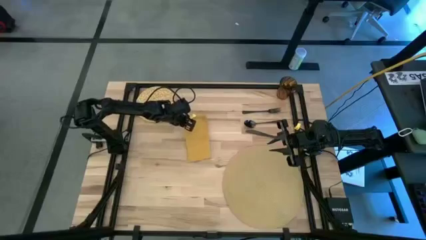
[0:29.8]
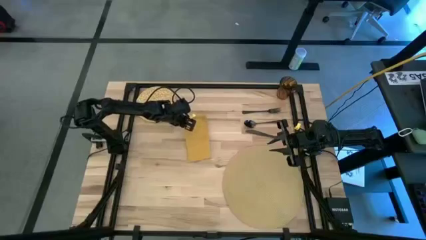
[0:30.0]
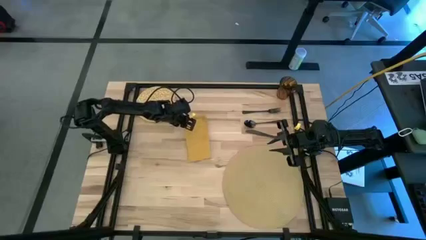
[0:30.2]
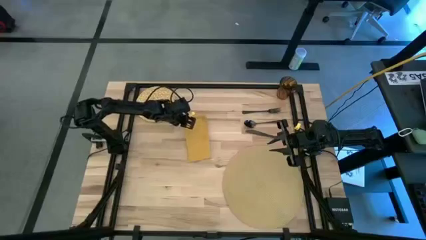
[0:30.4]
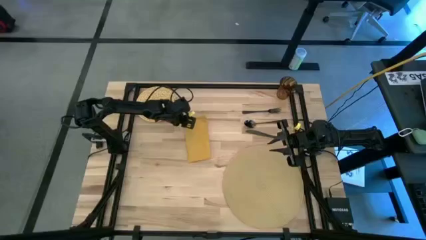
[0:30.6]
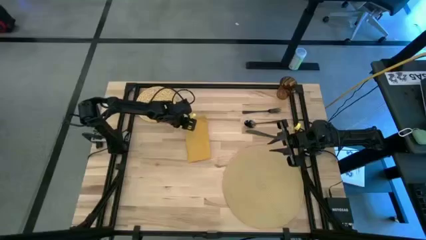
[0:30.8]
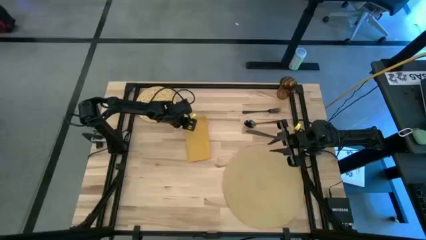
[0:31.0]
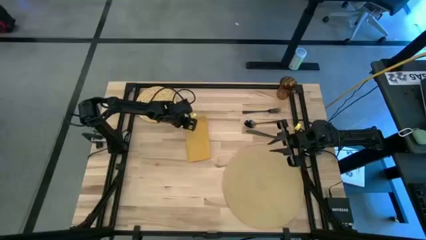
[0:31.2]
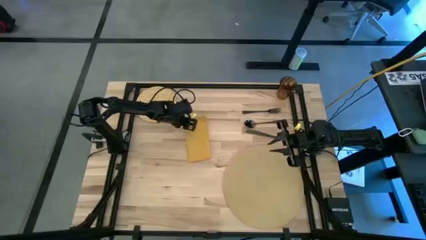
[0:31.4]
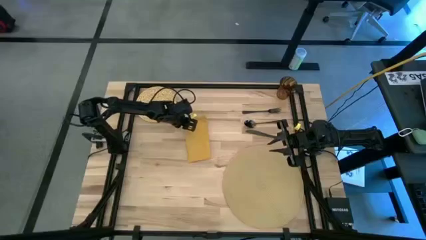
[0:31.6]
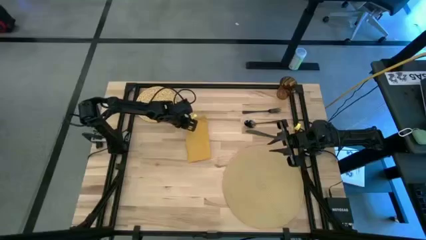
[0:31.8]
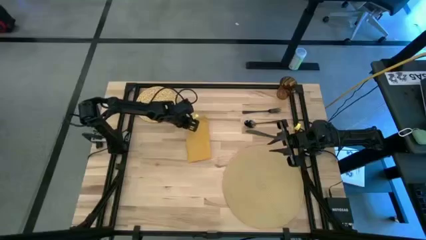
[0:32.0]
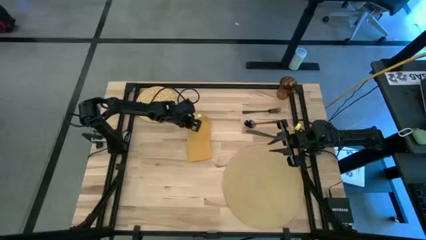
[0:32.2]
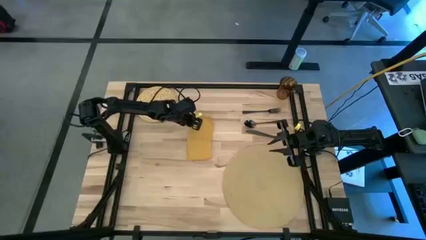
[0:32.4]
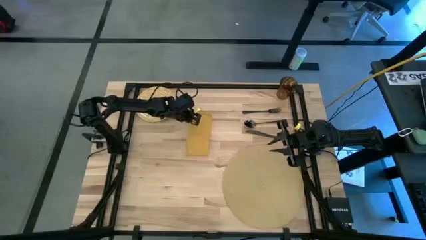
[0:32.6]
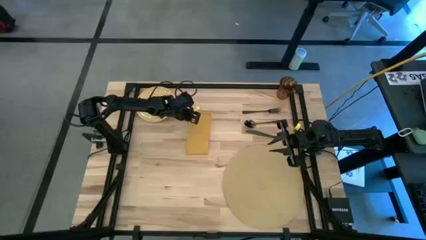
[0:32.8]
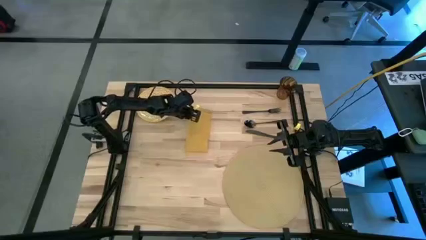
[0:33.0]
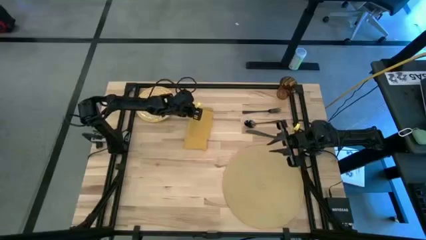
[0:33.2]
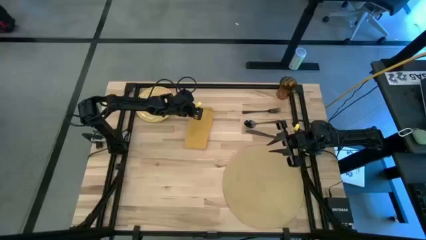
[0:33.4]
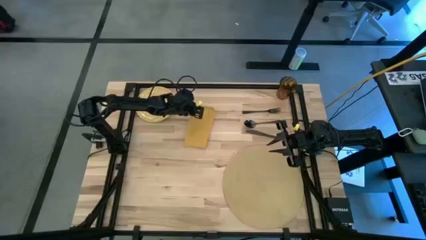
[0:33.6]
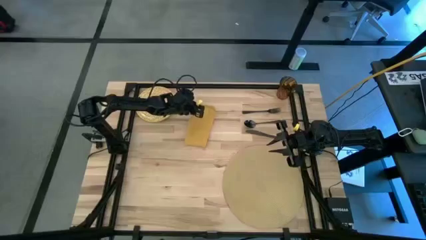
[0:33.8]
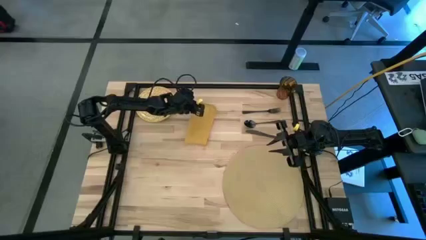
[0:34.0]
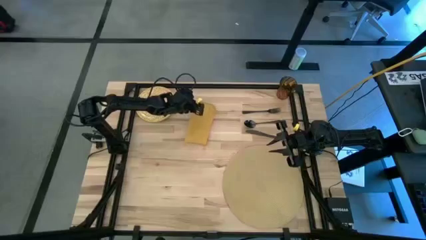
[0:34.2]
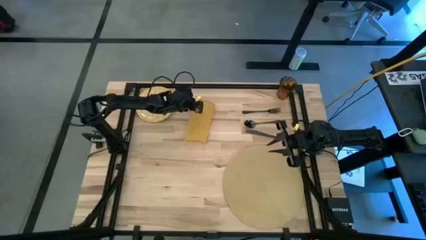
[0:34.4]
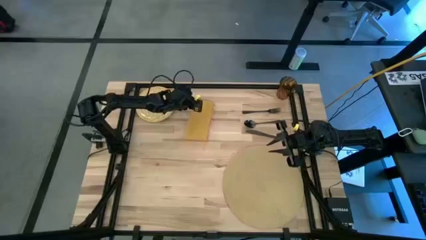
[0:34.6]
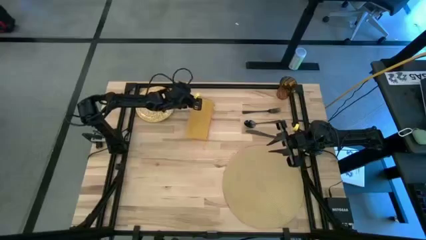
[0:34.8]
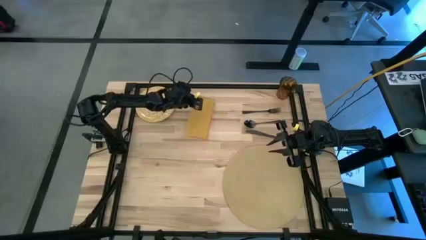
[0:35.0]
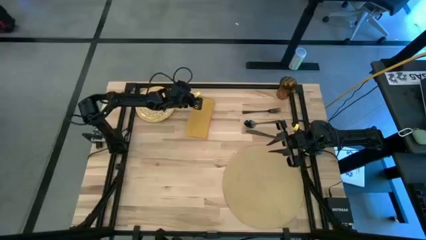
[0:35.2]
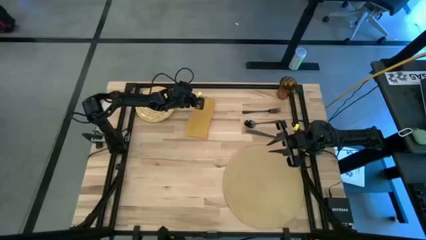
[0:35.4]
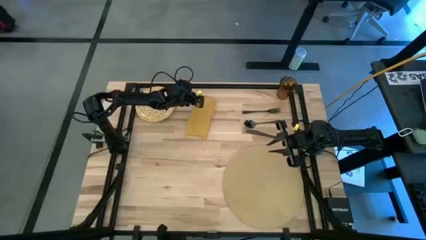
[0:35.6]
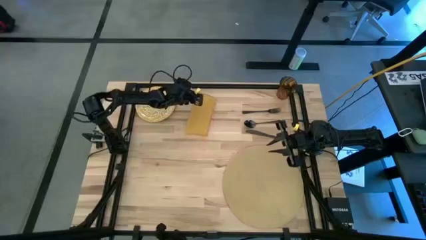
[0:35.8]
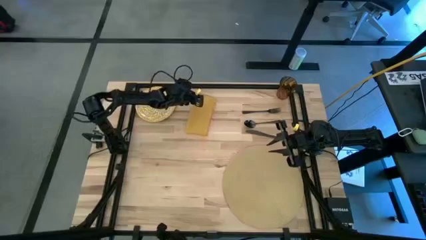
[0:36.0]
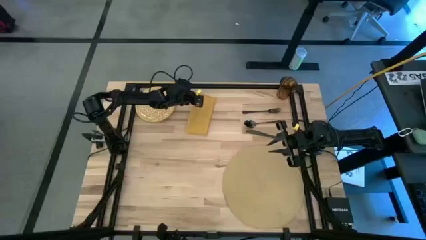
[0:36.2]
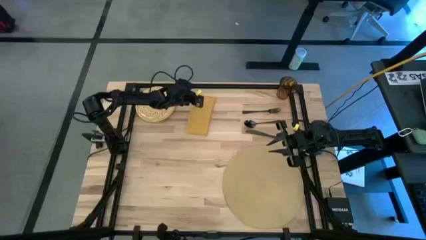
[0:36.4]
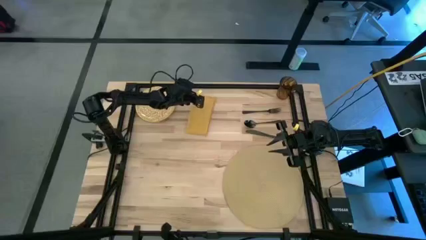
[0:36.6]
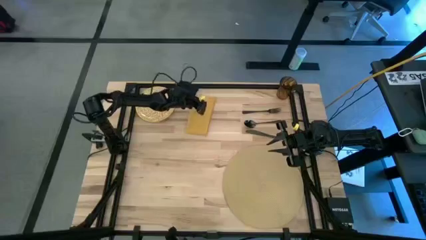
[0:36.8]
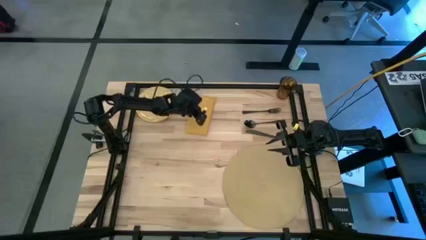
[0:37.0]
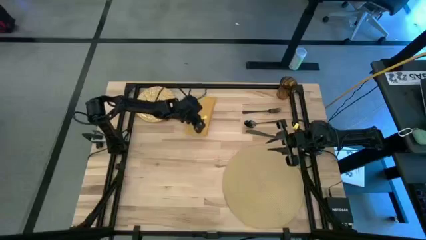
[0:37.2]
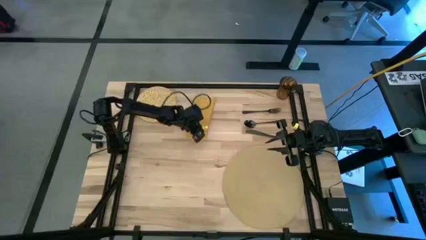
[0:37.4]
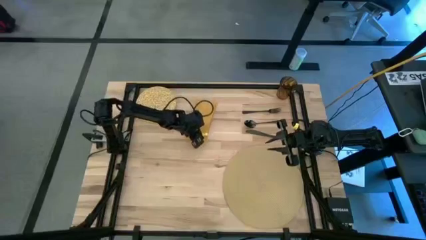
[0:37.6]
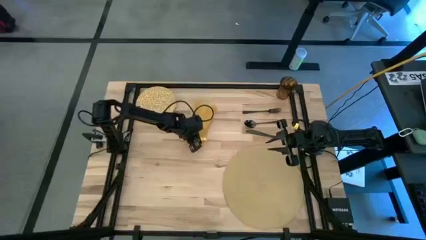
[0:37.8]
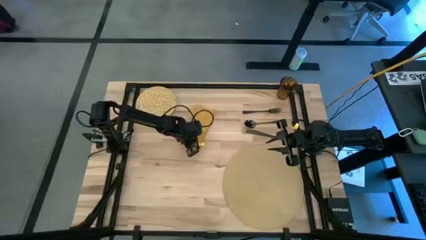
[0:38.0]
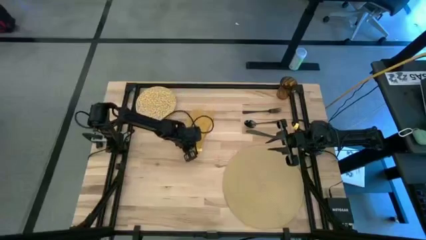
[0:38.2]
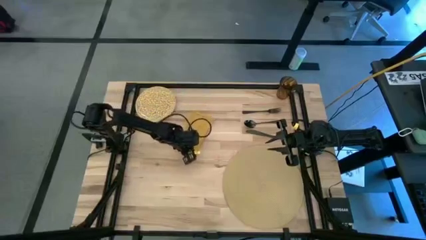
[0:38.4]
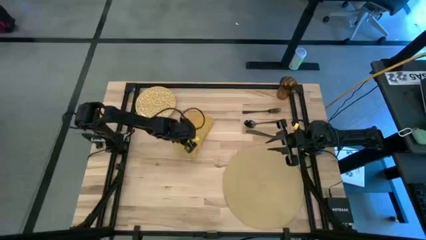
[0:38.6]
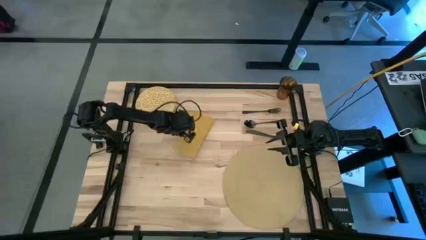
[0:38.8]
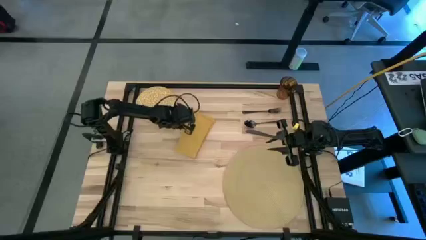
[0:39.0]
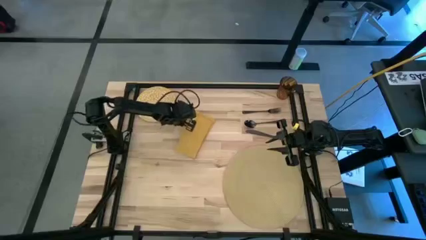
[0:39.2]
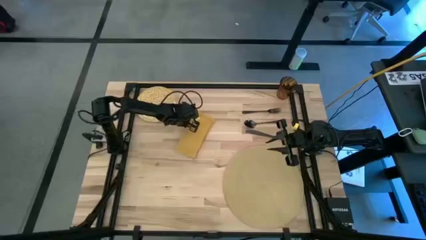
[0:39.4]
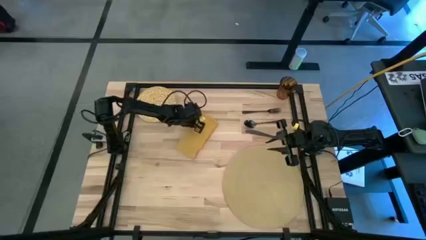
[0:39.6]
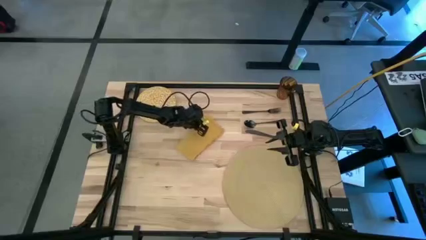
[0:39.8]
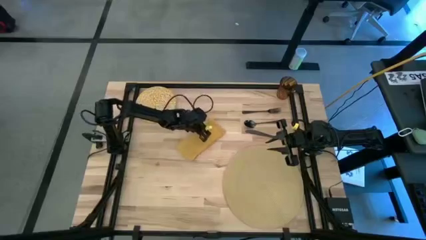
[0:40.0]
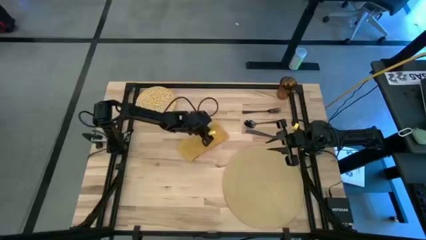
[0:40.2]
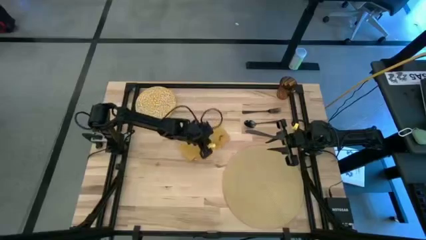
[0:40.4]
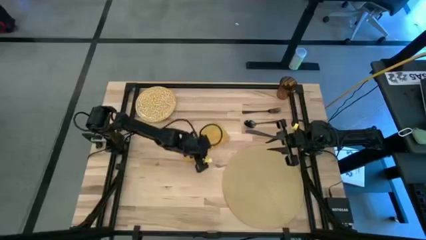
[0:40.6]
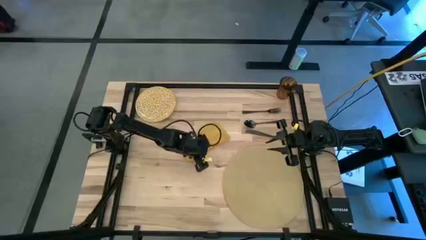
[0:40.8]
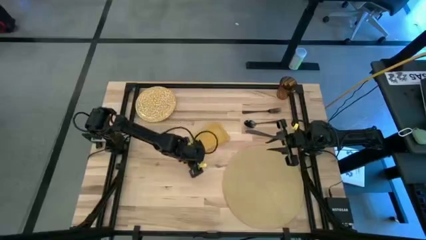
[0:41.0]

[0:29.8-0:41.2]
Task: Set table place
Fold the yellow table napkin

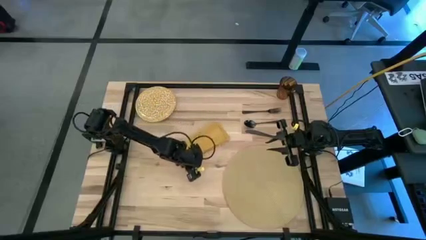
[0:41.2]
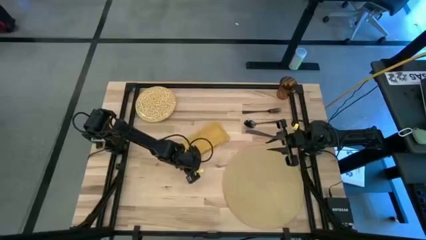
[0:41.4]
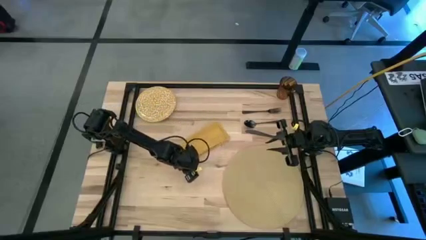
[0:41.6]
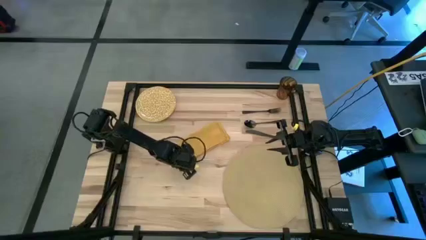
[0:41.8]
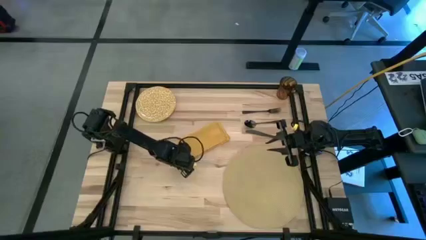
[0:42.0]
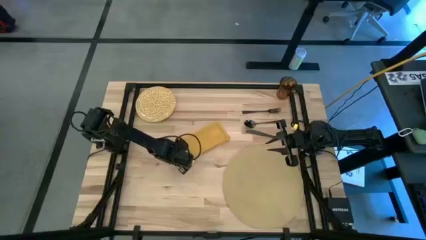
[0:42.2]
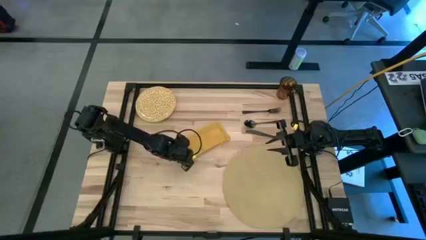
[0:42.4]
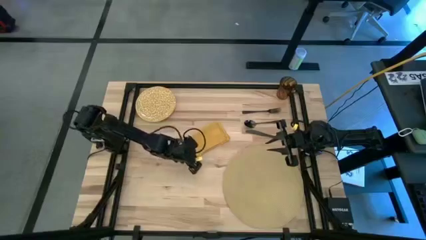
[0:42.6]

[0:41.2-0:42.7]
Fold the yellow table napkin
